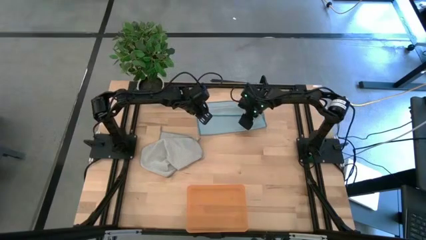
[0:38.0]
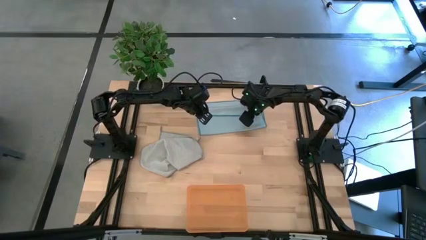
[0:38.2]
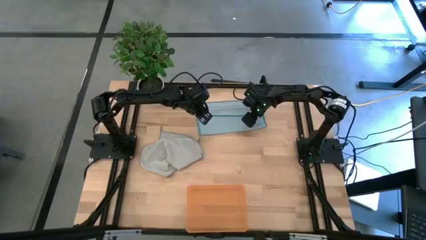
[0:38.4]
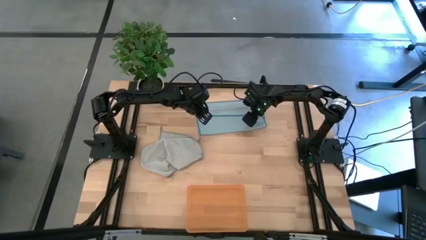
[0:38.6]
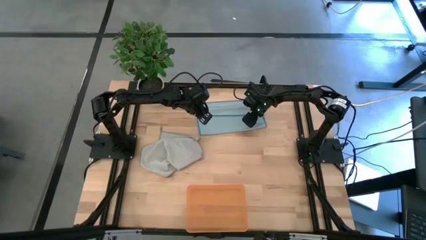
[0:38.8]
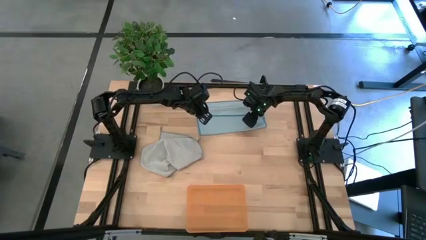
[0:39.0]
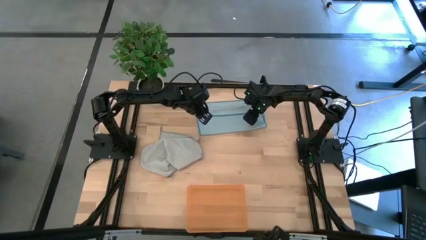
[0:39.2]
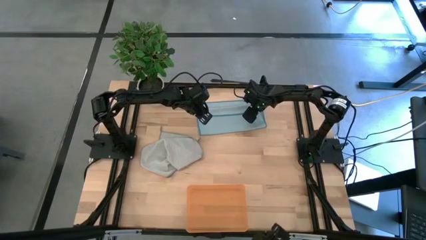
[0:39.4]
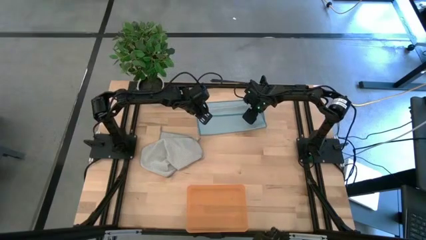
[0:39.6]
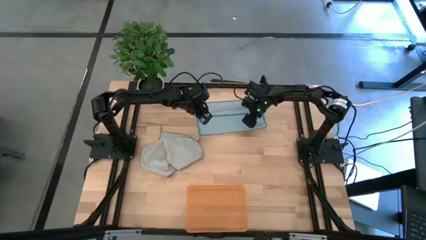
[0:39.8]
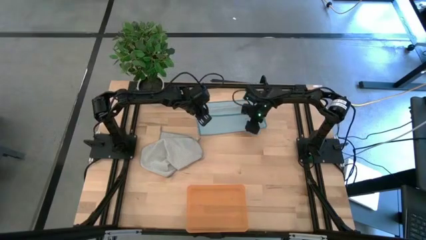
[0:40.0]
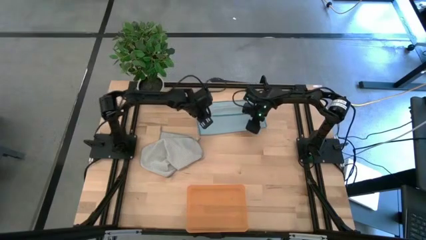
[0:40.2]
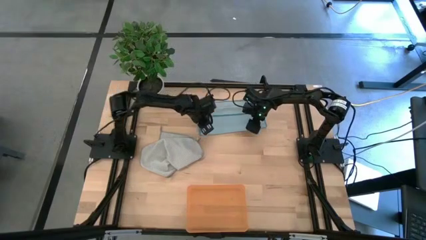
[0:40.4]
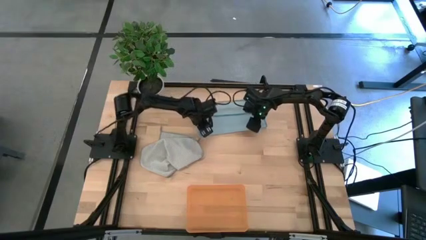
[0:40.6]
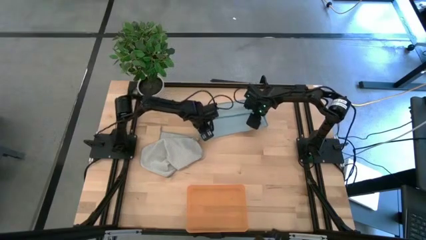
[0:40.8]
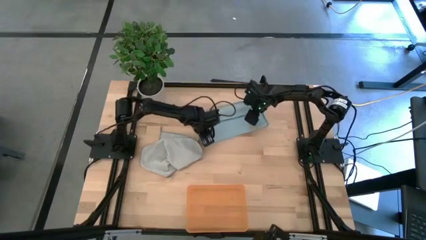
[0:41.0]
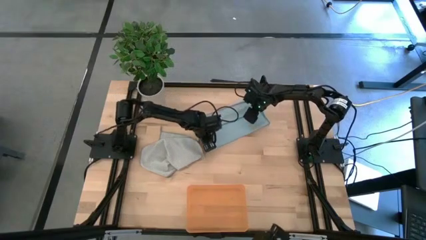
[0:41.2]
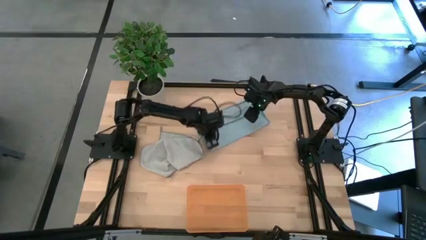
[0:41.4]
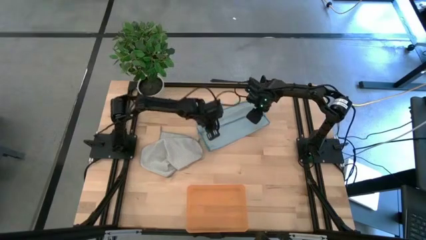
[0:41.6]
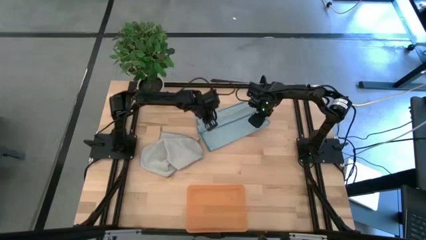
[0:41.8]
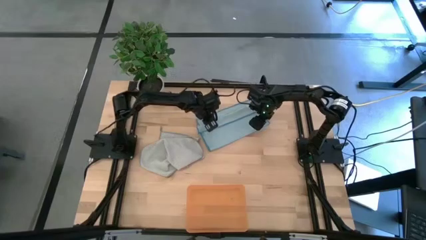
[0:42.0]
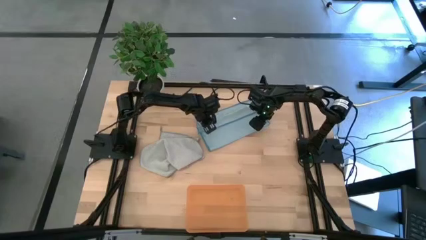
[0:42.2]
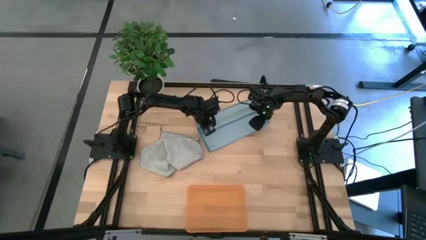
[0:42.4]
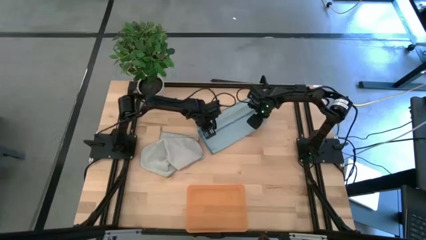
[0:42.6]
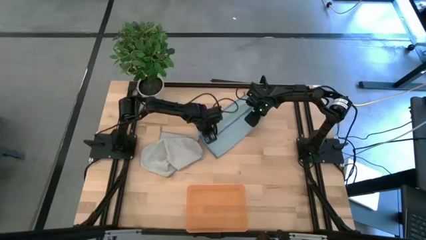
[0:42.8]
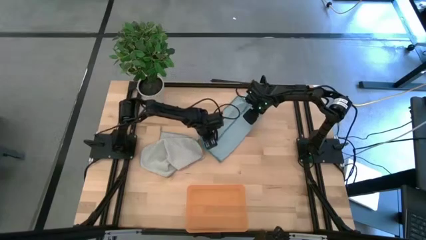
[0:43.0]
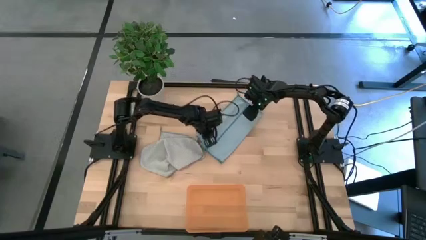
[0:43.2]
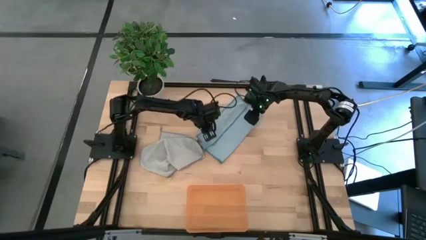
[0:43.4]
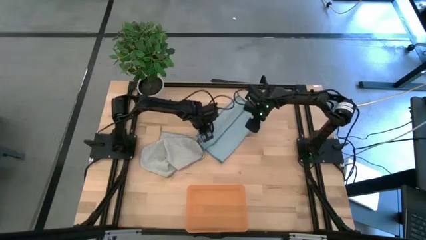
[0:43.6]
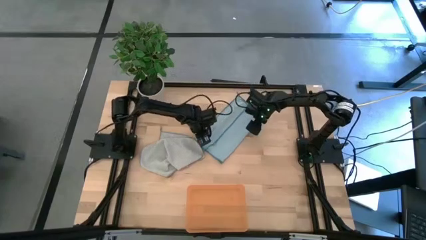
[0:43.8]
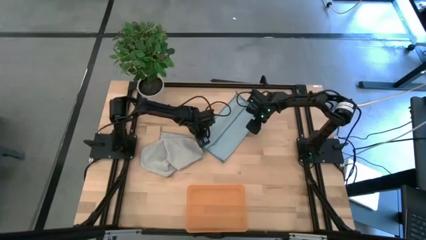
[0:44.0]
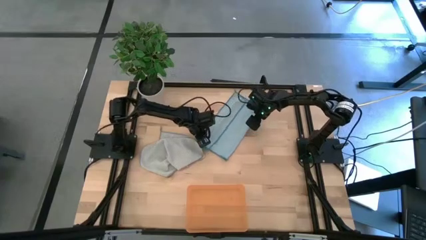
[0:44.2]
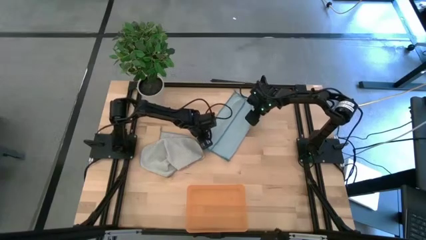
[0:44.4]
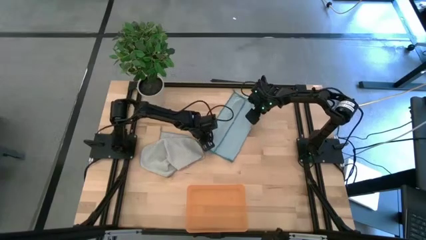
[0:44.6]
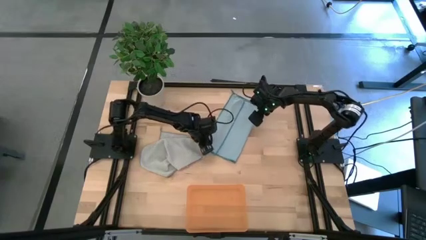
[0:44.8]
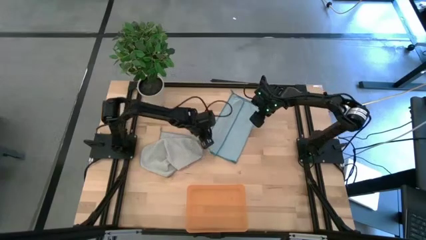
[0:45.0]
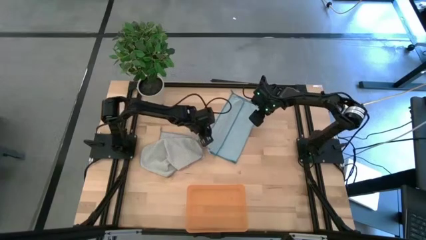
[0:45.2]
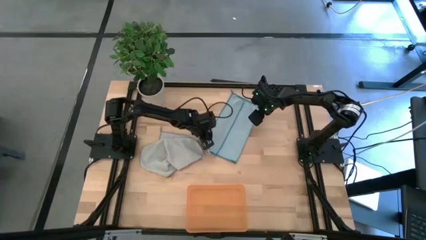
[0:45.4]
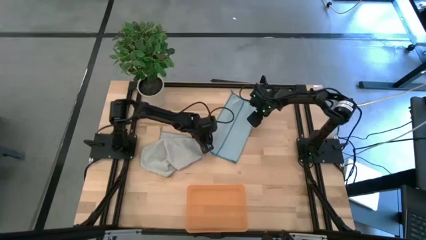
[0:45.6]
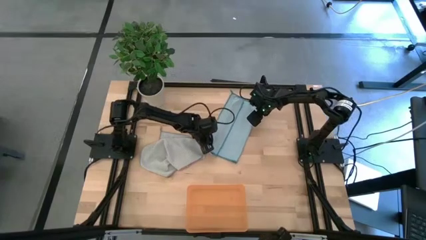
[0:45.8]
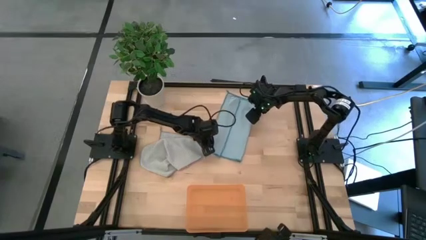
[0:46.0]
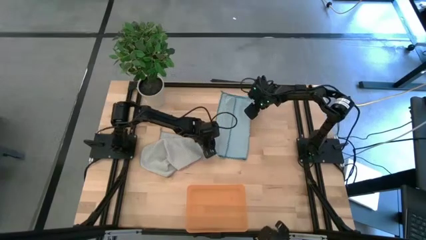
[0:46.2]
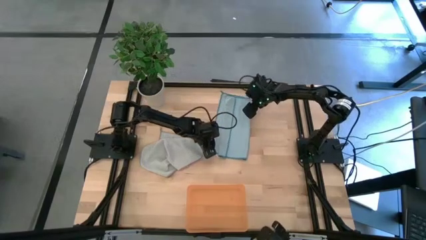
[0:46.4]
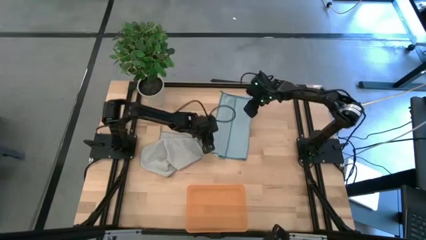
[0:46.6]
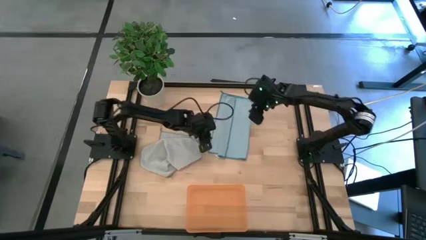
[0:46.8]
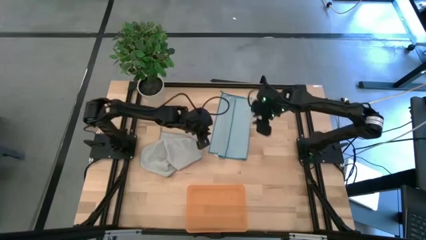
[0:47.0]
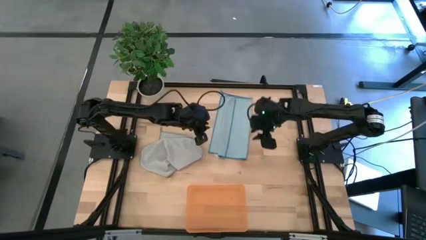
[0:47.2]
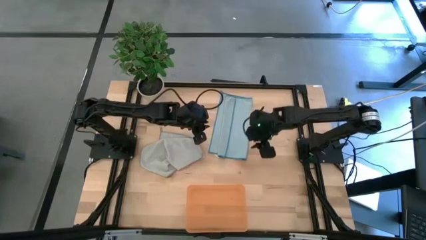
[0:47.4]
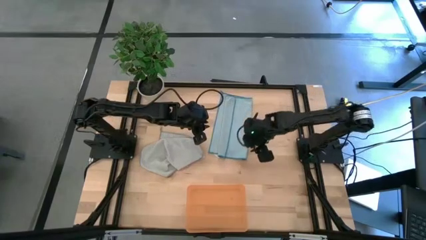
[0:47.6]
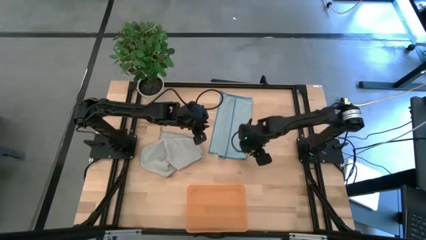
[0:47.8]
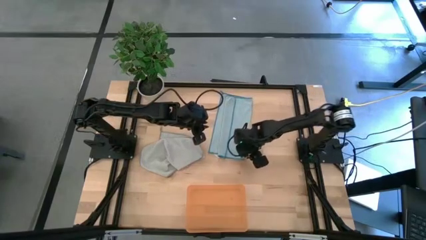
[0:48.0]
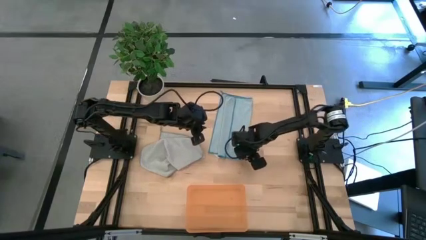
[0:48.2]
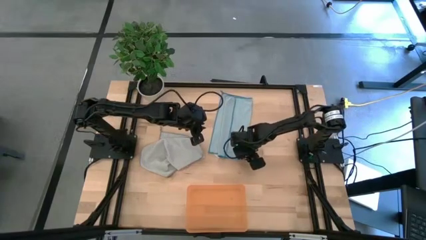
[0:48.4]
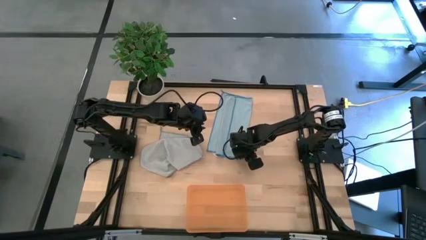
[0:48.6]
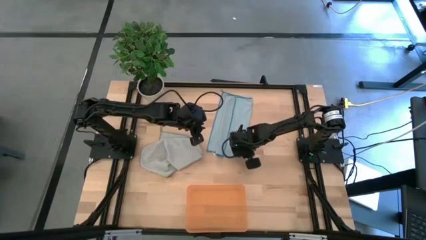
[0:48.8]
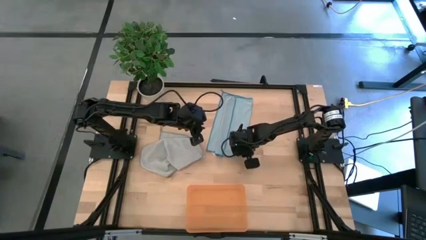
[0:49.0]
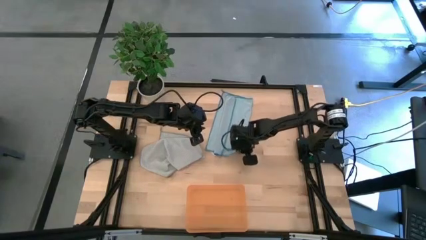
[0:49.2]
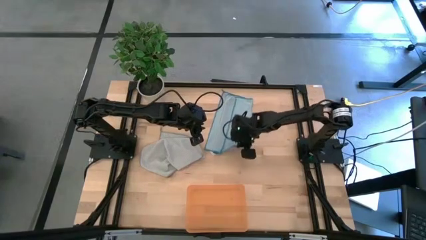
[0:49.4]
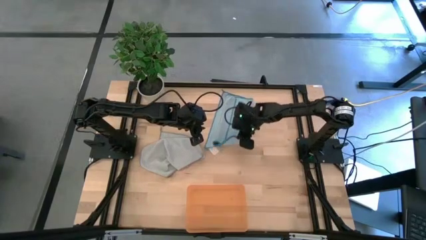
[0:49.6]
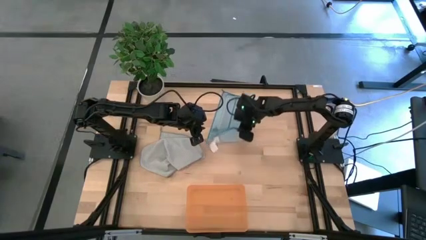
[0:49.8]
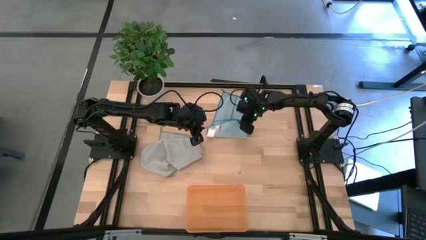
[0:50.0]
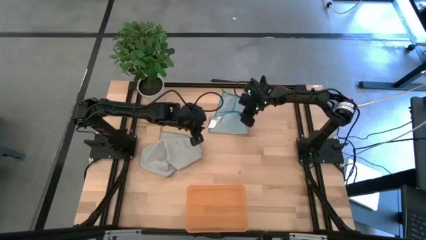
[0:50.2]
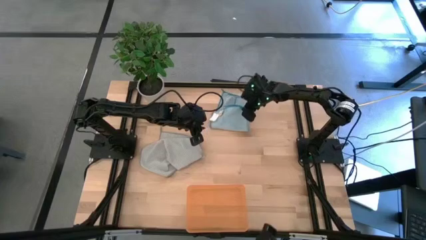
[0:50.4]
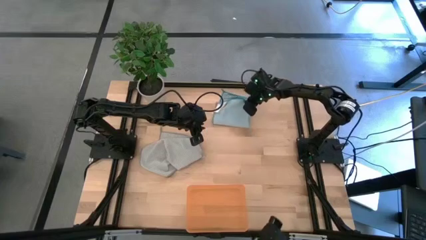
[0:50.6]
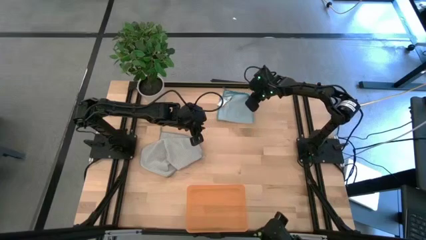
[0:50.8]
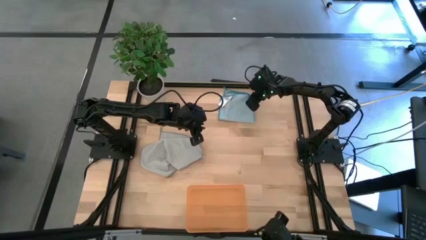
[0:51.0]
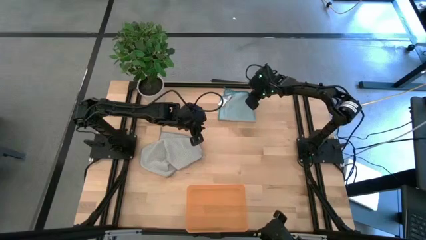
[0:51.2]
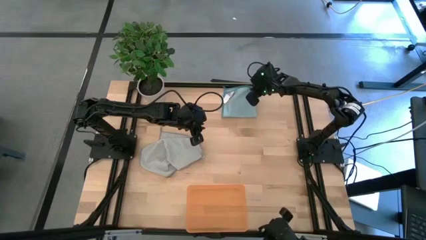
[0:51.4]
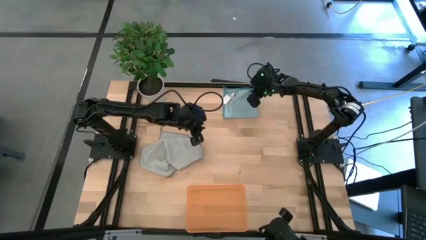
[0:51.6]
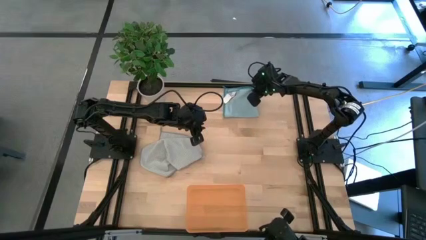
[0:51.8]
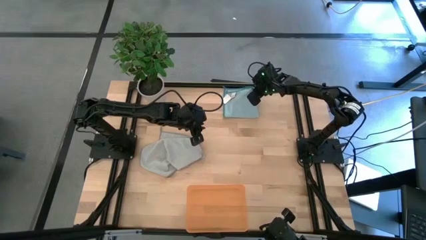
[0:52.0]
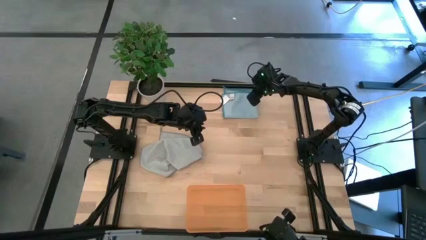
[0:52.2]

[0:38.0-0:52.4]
Task: Roll microfiber towels into tight, uniform cylinder then place into a basket
Fold the blue towel
